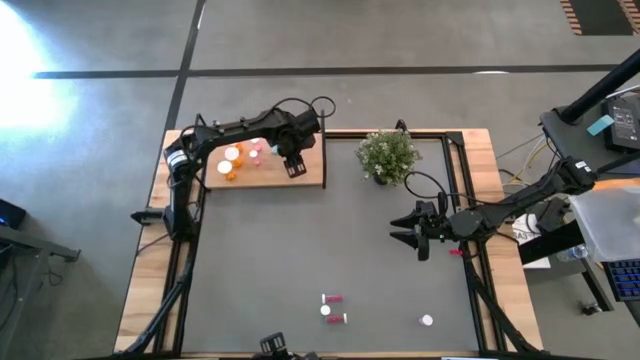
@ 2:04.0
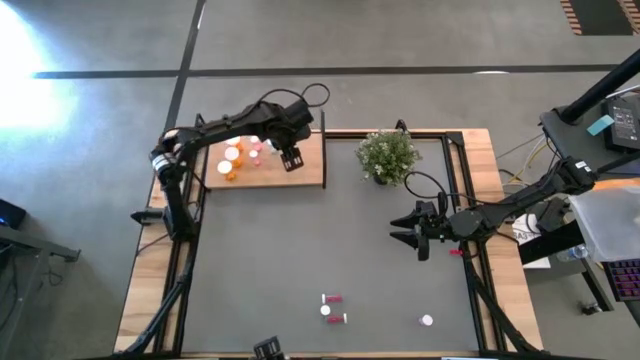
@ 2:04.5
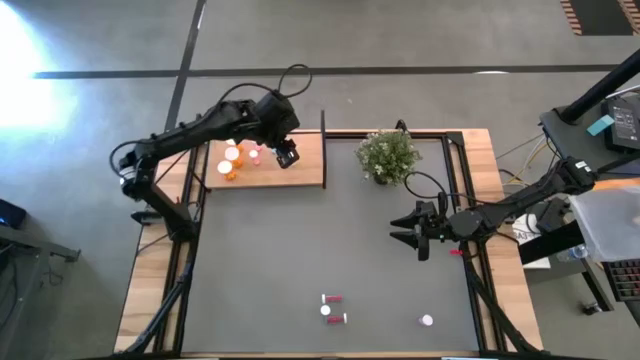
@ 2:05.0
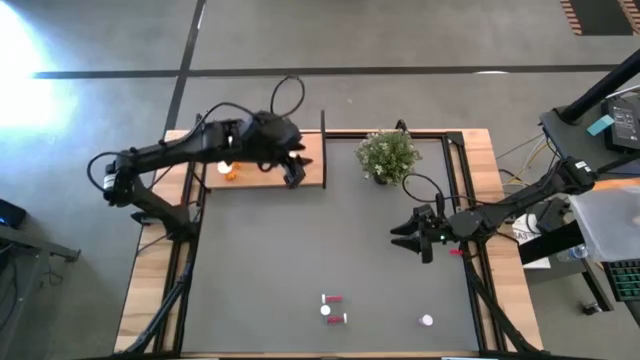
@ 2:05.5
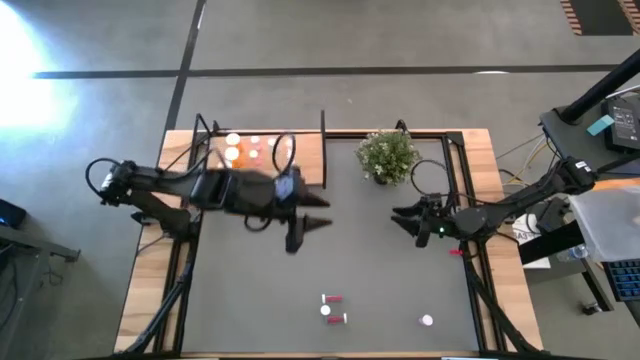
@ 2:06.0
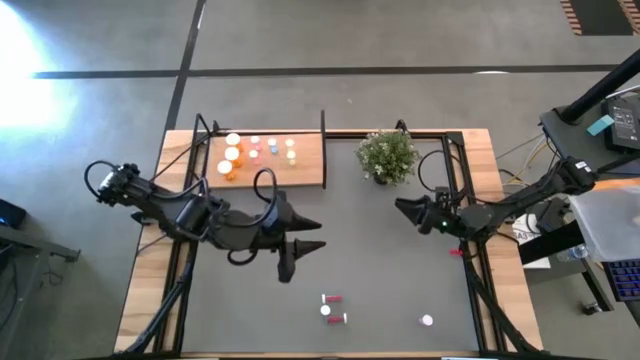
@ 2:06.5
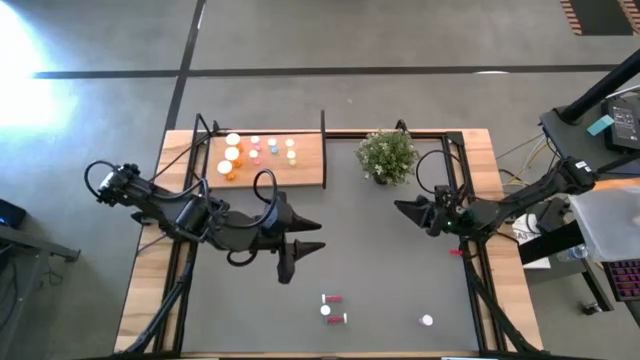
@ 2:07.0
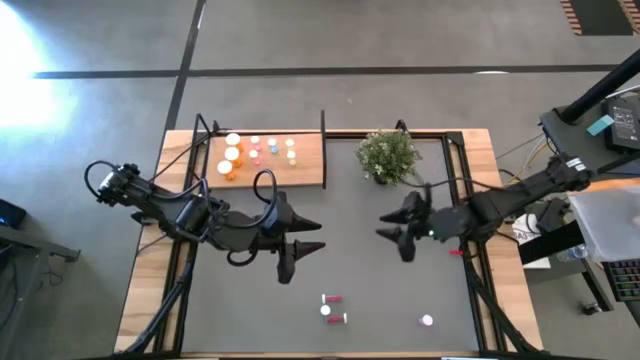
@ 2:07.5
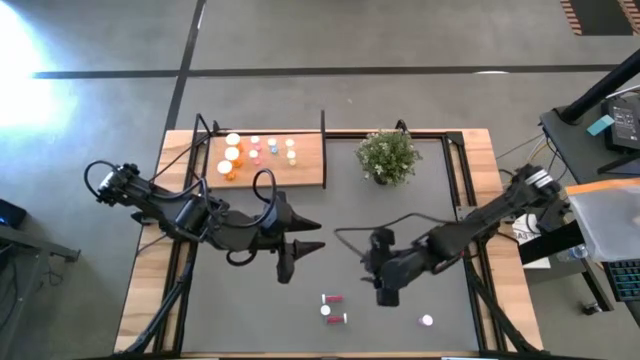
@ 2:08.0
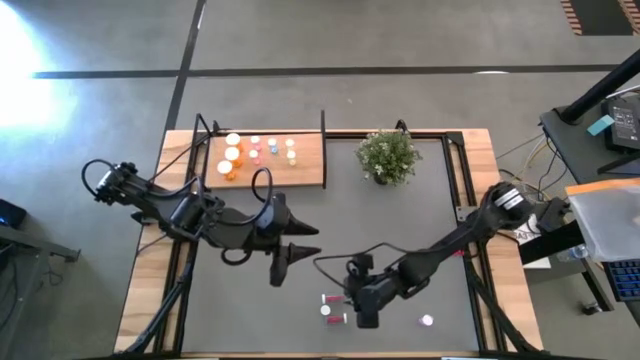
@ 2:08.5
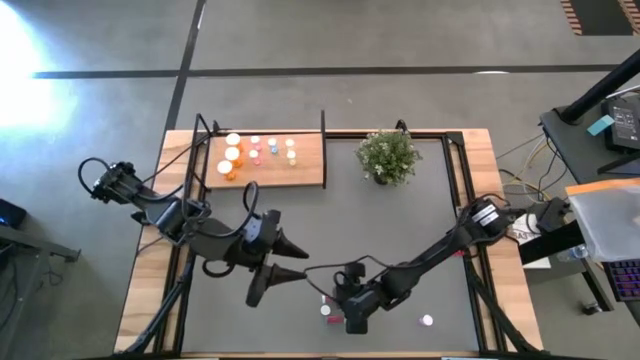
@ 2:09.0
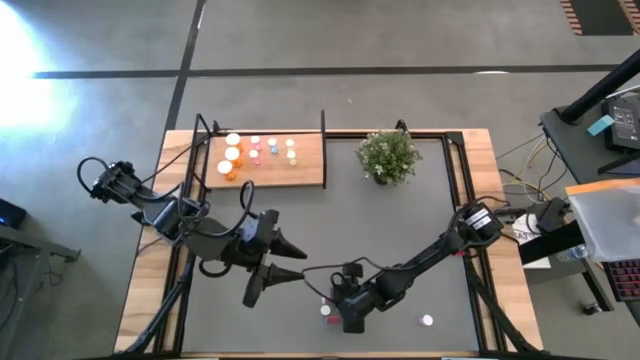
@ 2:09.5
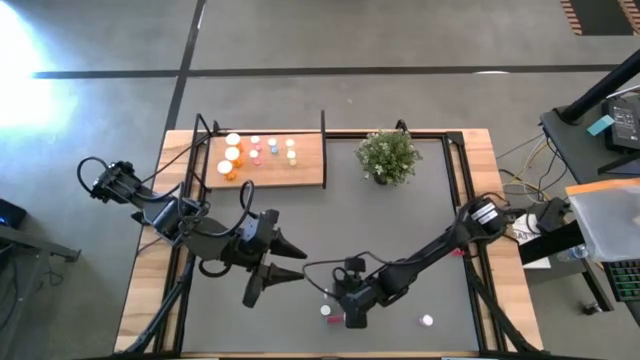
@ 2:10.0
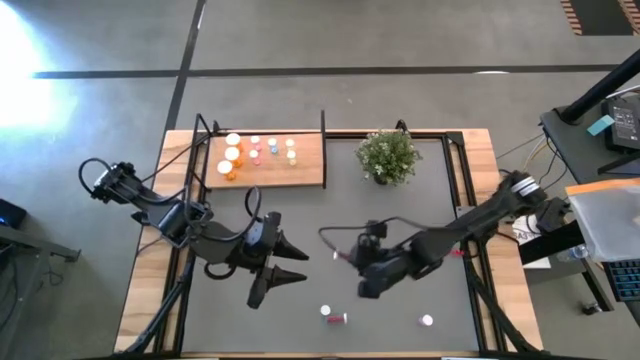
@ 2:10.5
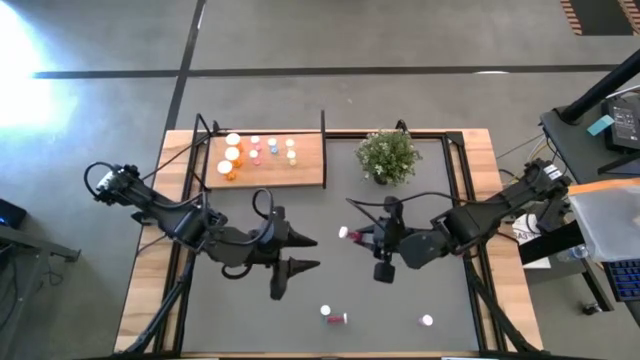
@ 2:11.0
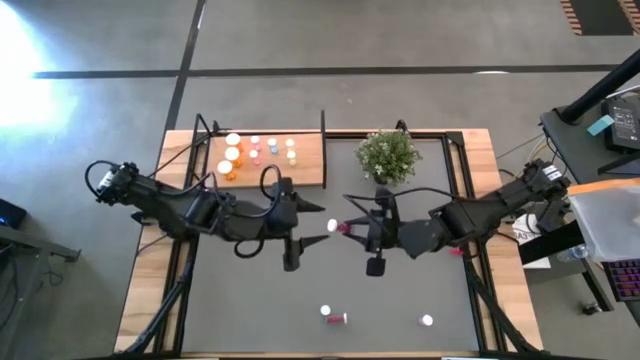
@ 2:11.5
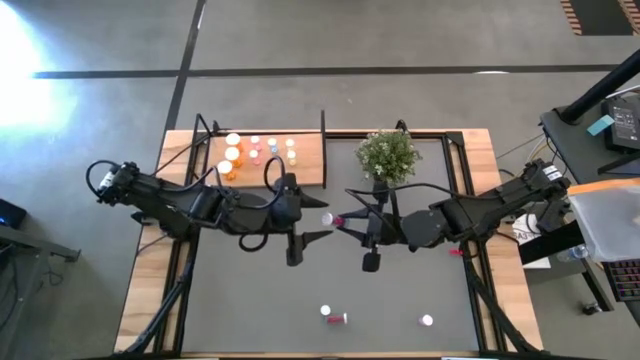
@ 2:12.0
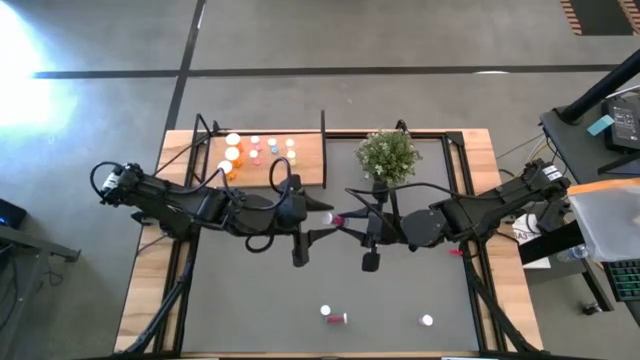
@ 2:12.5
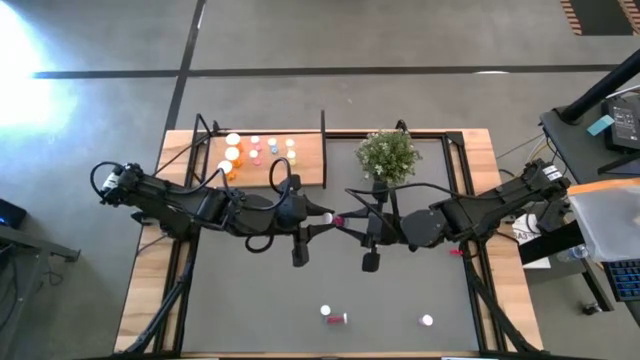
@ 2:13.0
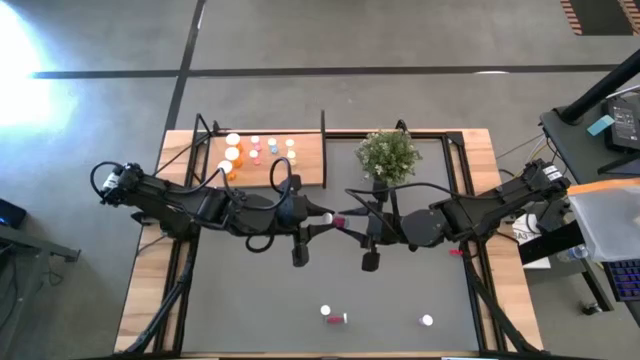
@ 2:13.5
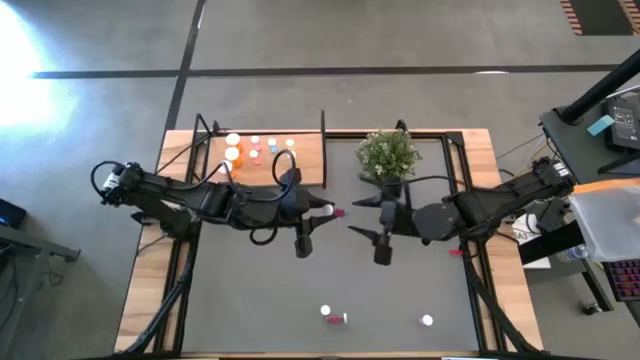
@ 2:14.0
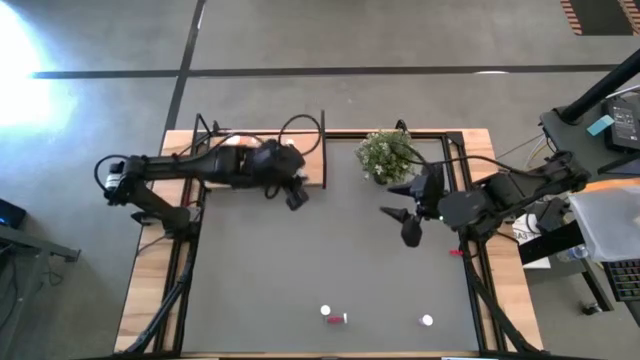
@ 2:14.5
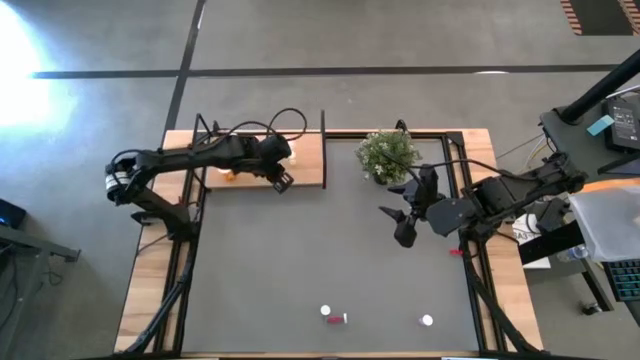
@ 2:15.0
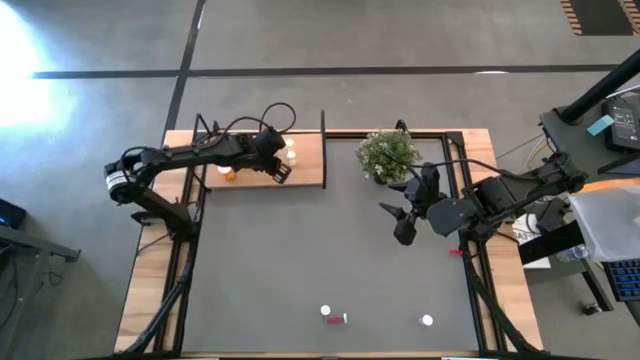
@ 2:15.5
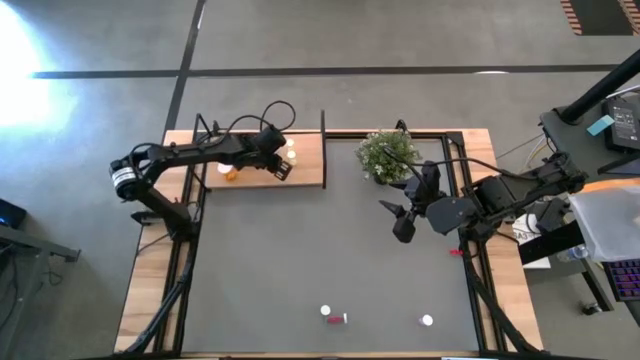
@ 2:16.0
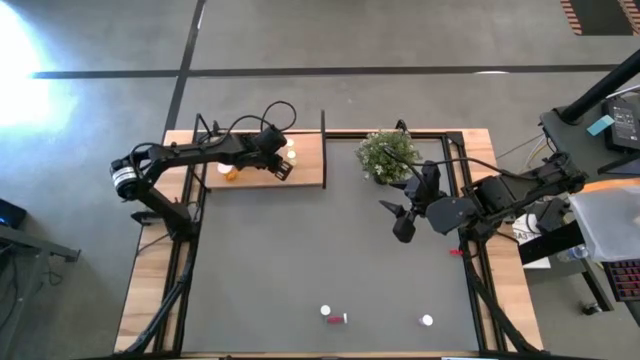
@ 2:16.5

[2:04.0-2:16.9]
Task: Pick and place medicine bottles onto shelf by color
Put the top small blue pill bottle on the shelf aligned with the other small blue pill bottle

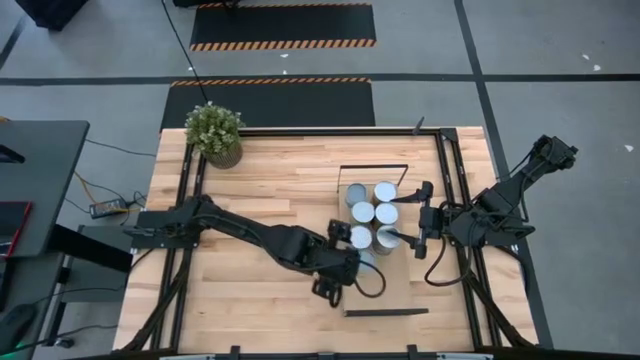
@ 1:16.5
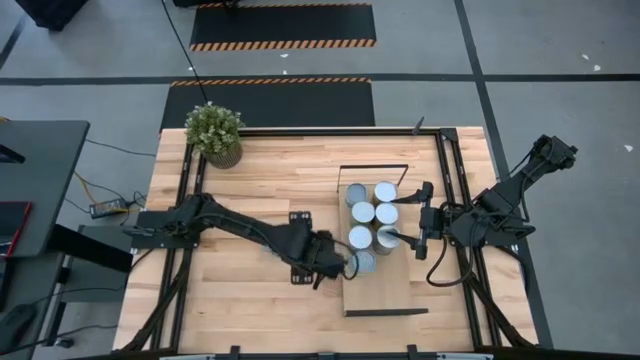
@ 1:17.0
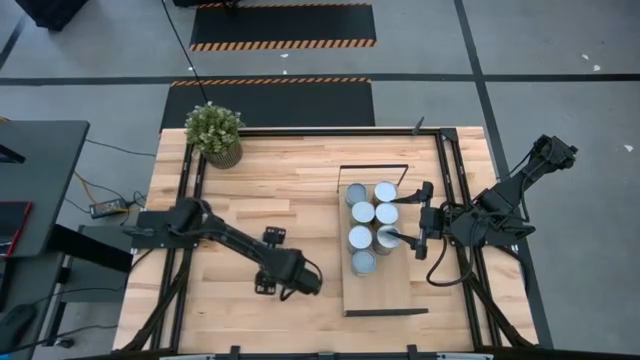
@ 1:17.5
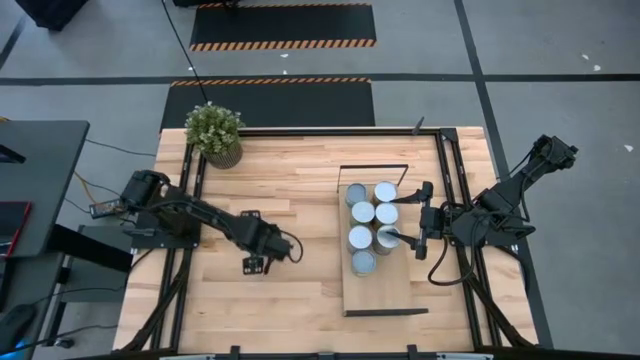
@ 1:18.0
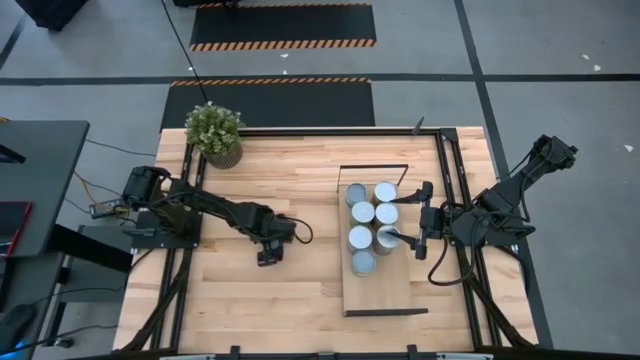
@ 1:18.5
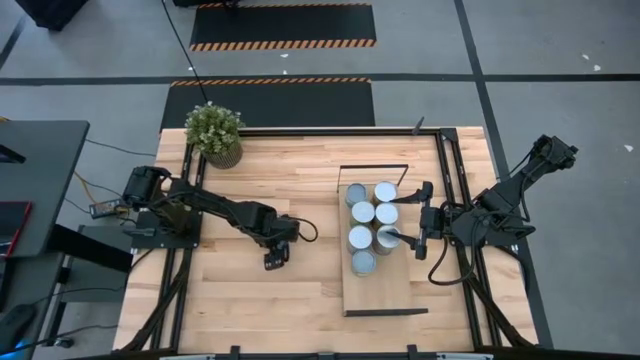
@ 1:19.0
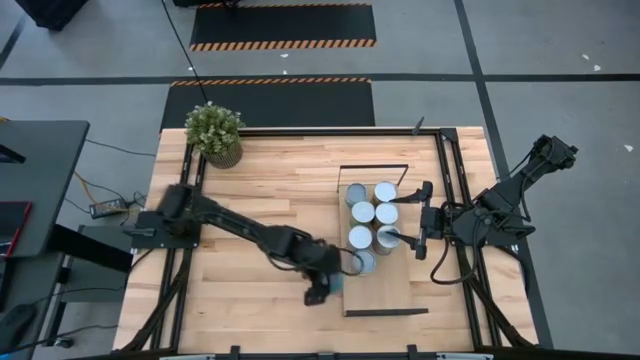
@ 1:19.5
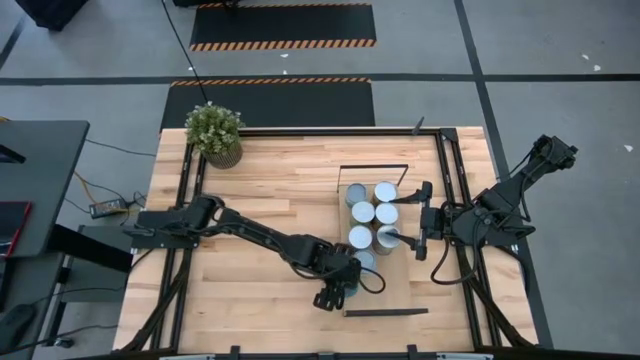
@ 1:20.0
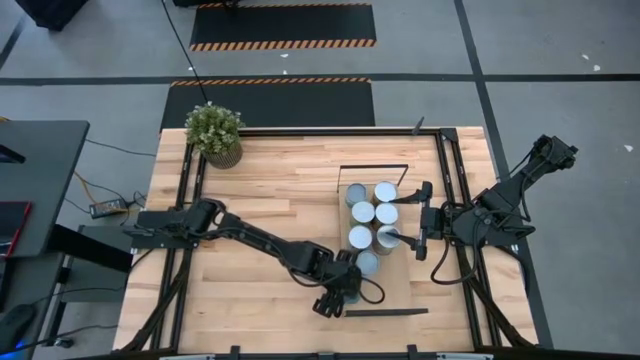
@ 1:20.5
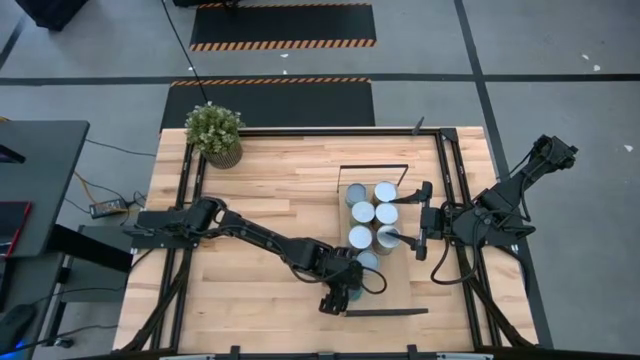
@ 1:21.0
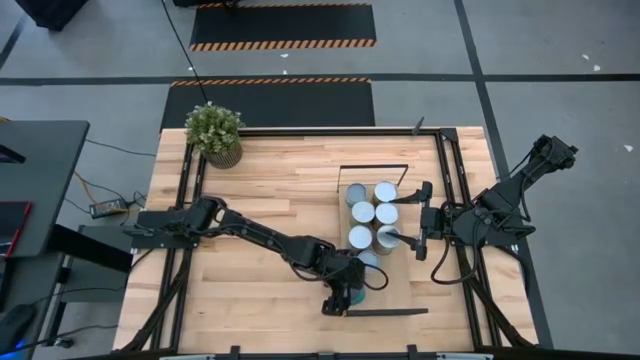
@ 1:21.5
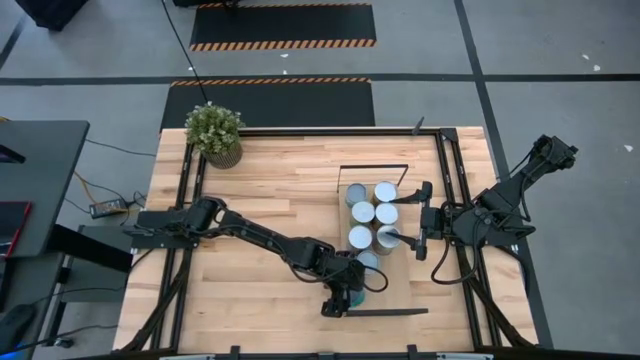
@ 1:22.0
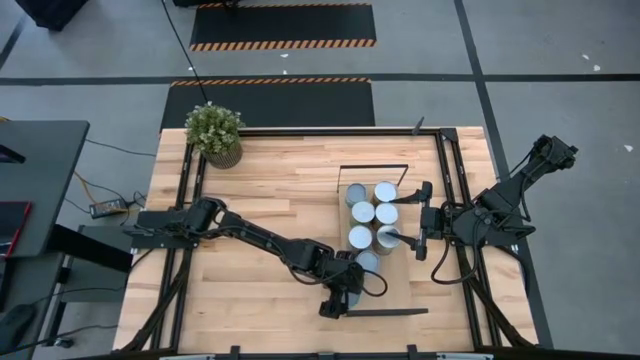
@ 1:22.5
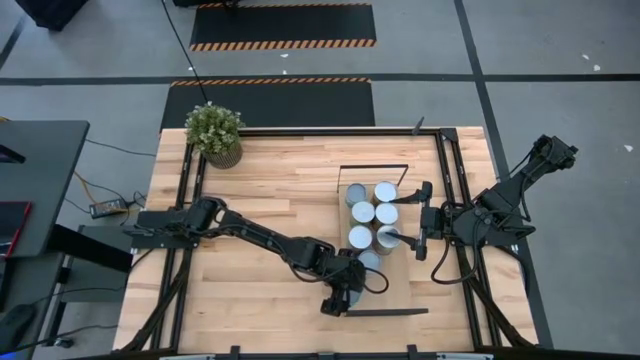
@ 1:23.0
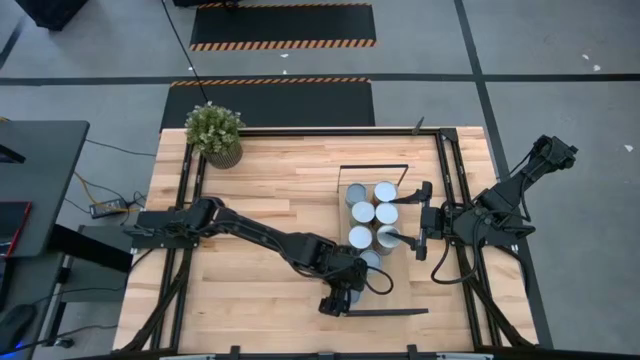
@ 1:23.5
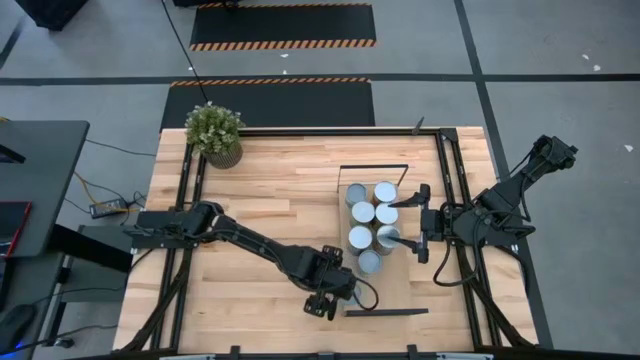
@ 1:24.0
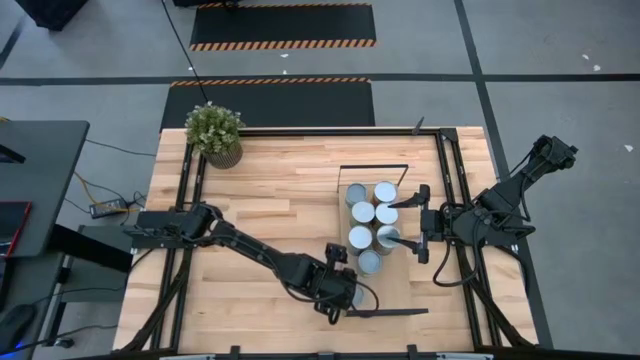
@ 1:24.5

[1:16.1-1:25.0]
Task: Pick and place cans onto a shelf
Put the canned tuna on the shelf

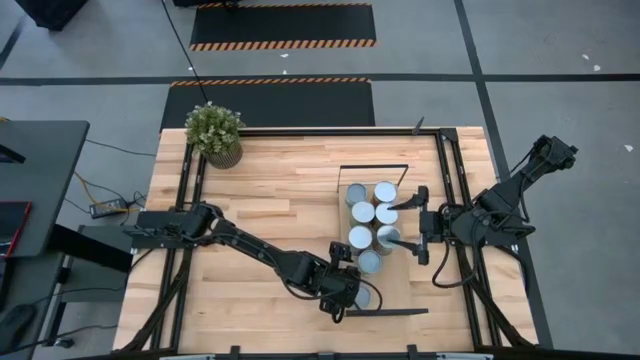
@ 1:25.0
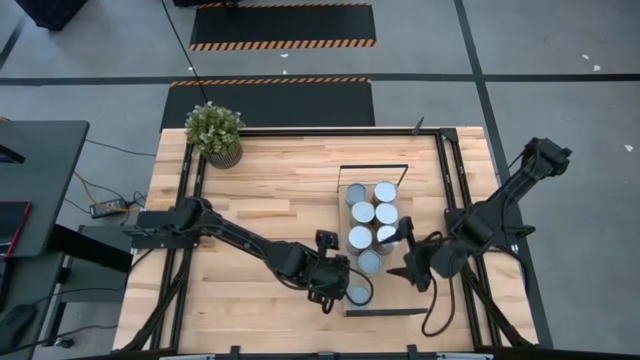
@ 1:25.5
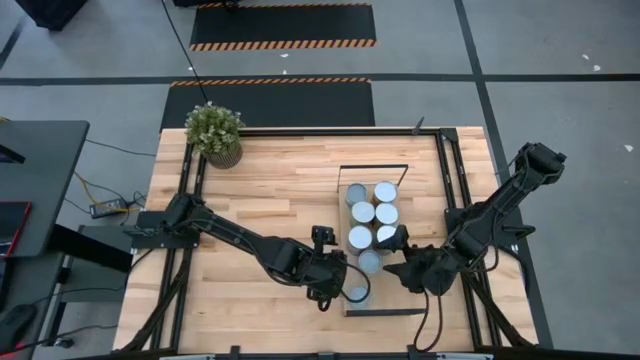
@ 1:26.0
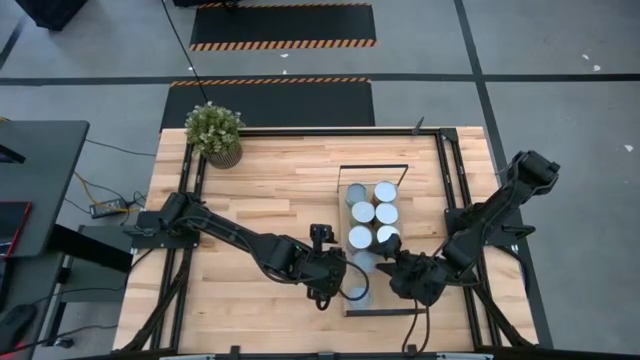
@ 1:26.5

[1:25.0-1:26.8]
Adjust the canned chicken soup
